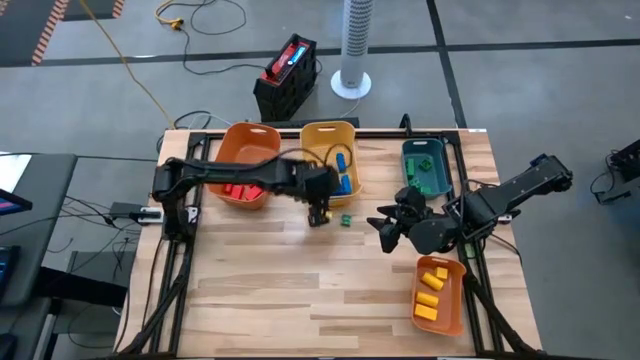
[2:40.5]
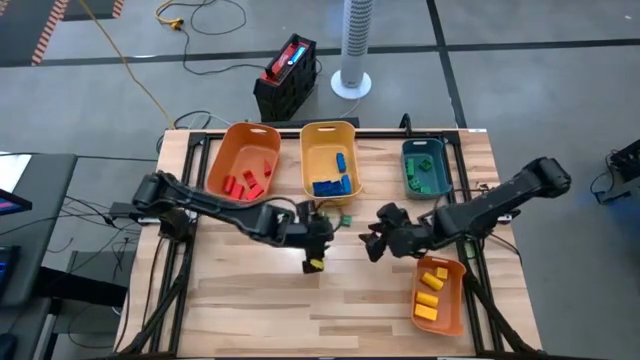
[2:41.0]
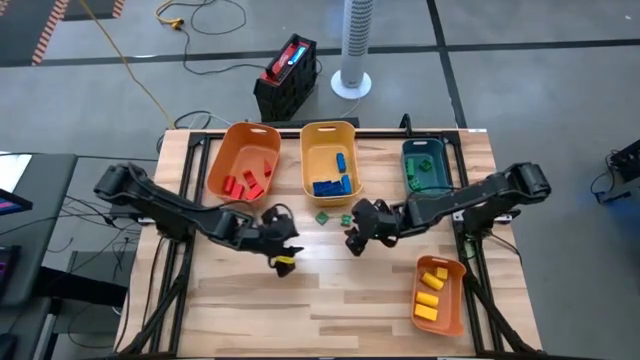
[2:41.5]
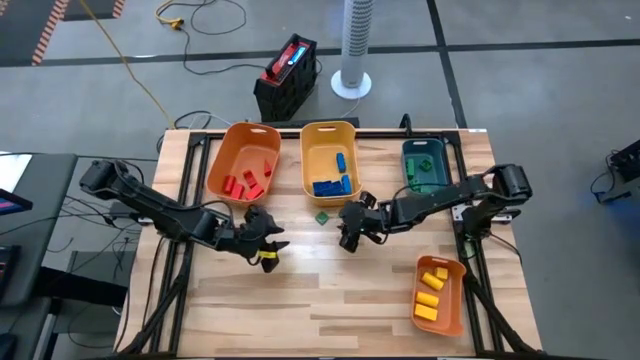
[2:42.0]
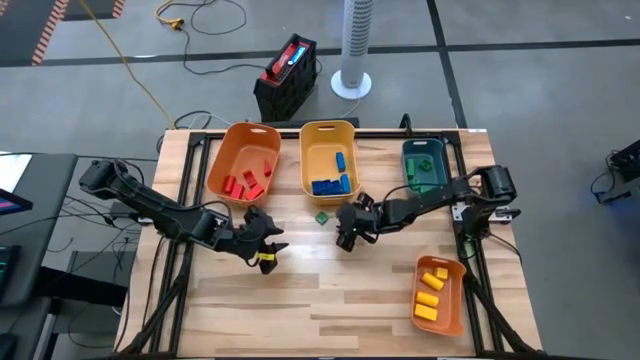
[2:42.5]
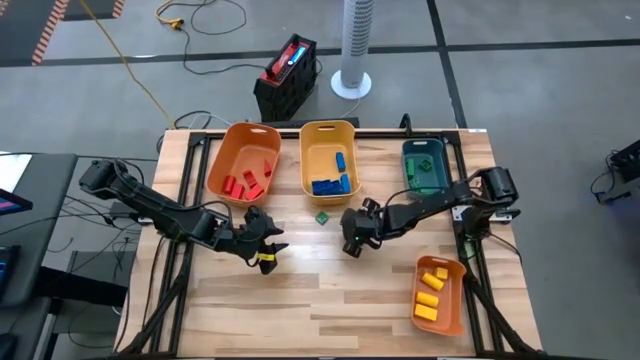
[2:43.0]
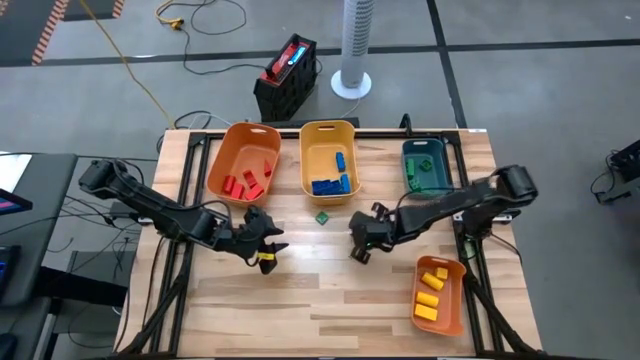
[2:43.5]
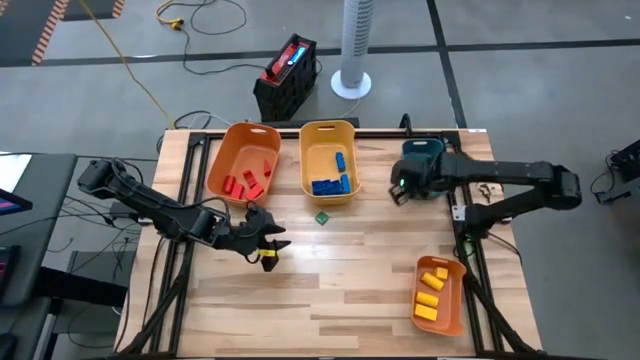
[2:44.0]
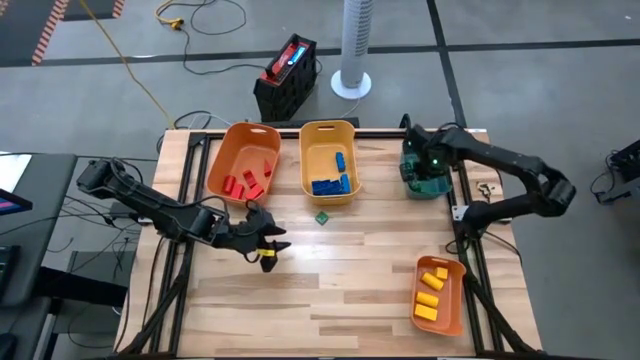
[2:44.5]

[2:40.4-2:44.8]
Task: Sort blocks
Put the green game piece into the blue bin

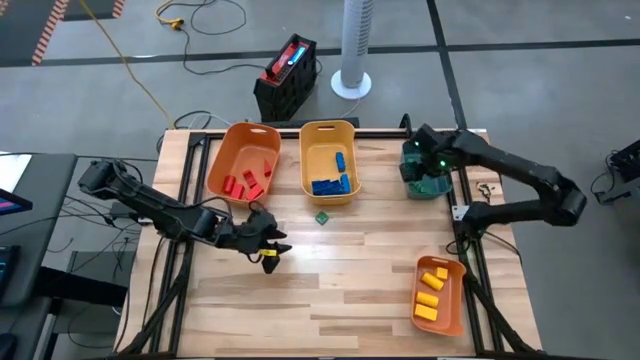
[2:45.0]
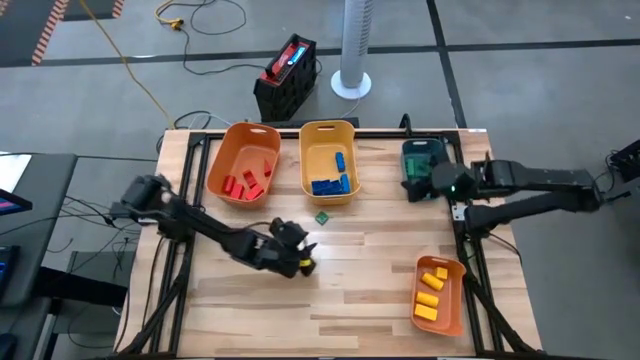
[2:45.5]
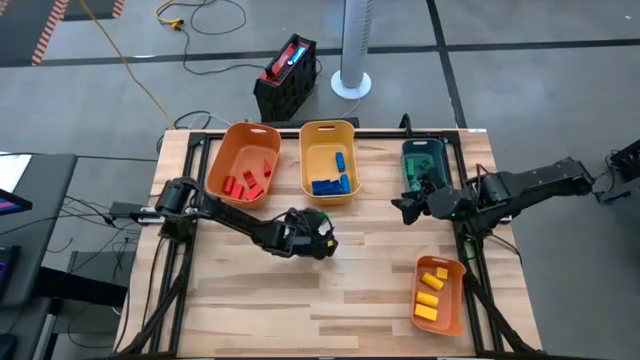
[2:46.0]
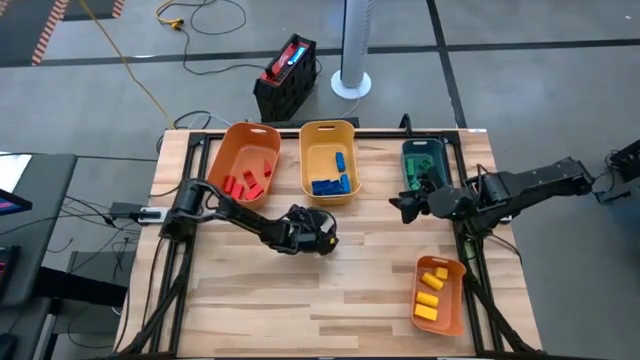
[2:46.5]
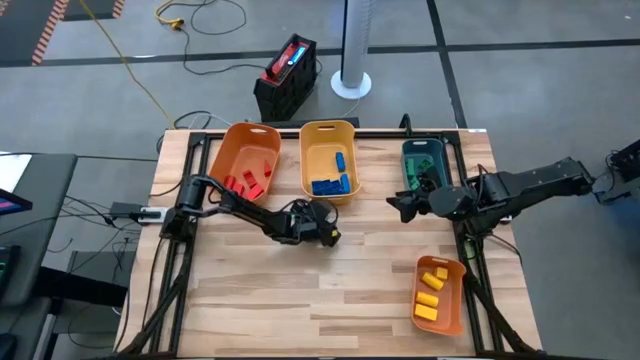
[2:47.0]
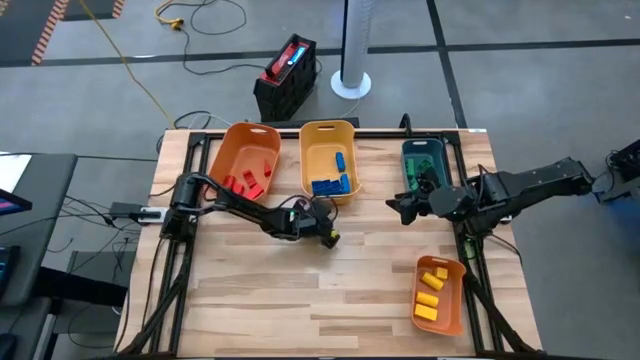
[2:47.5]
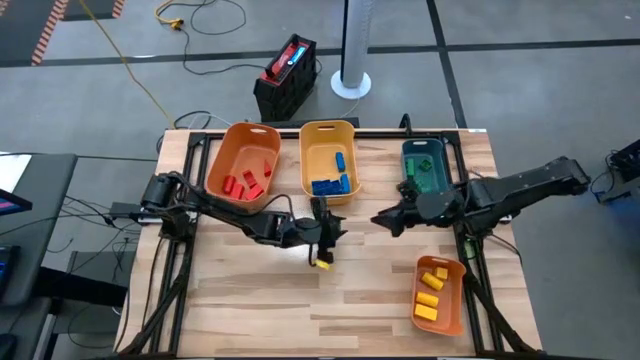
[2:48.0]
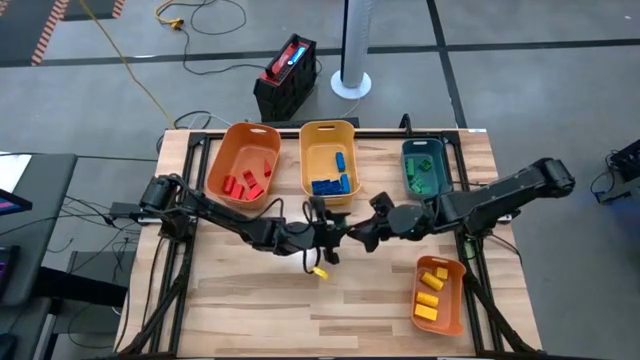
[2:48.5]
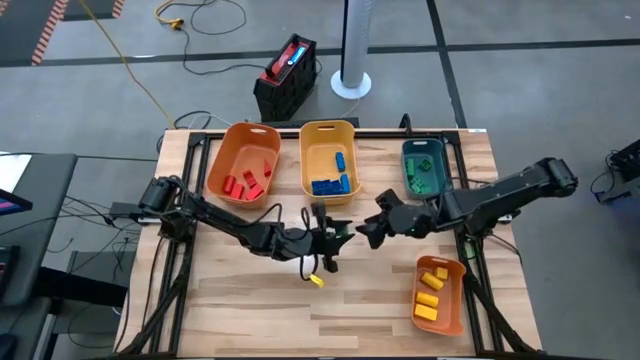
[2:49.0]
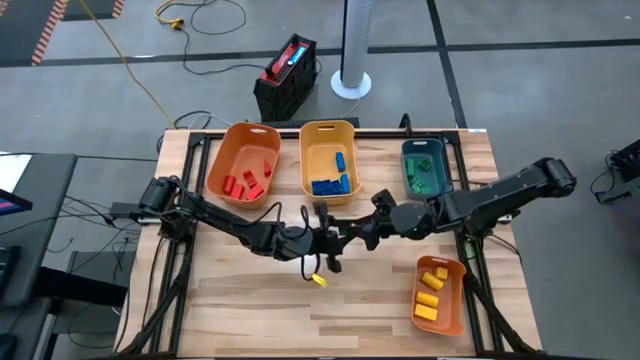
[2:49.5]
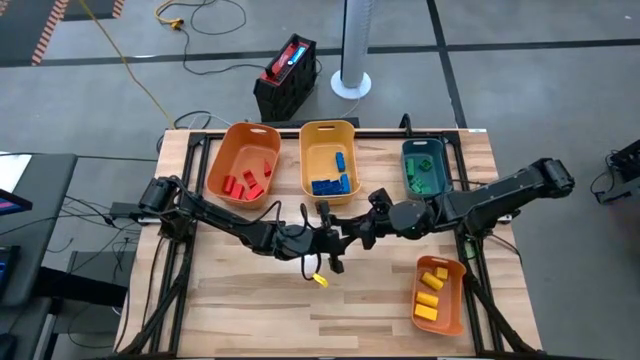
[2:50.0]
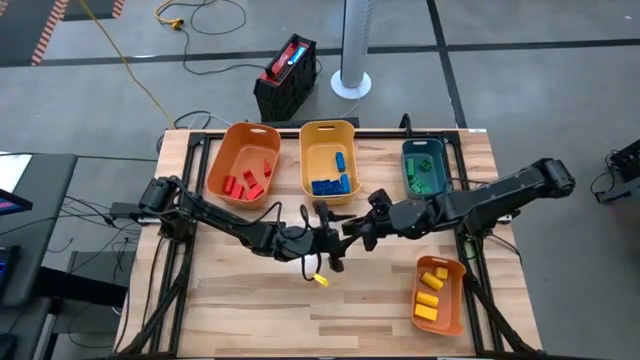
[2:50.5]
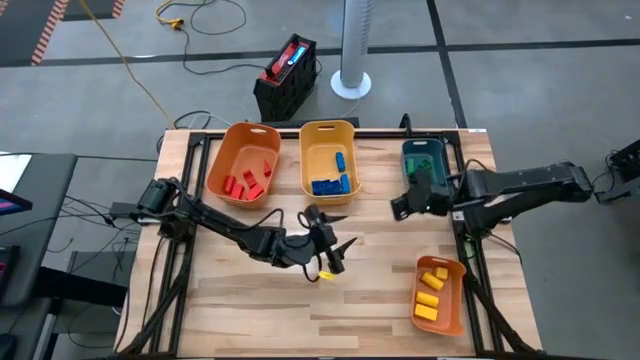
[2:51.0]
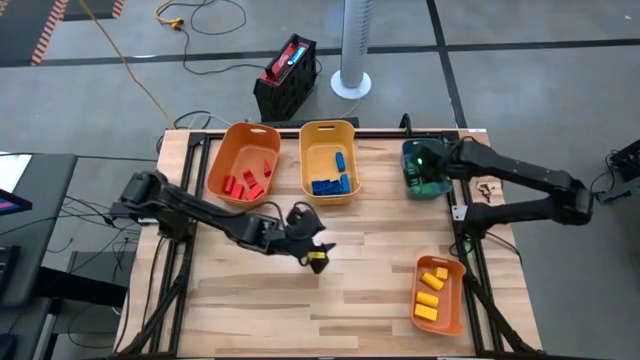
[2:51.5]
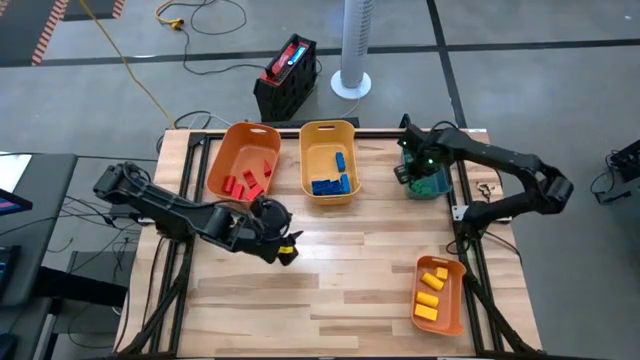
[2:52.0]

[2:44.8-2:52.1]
Put the green game piece into the blue bin

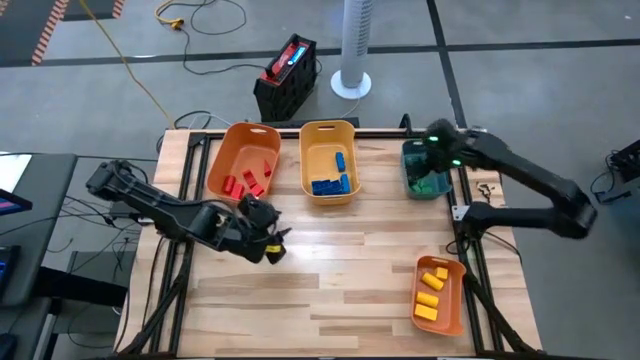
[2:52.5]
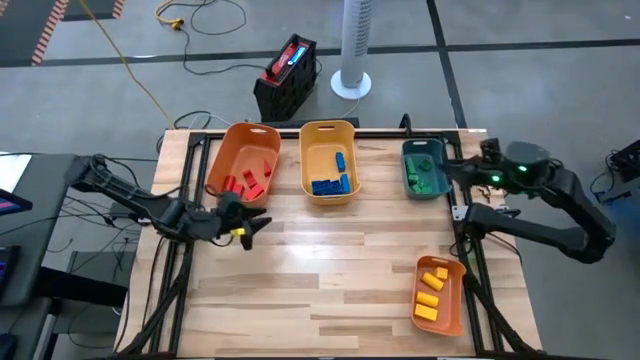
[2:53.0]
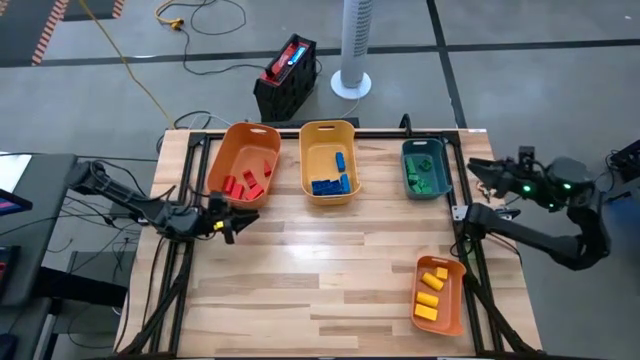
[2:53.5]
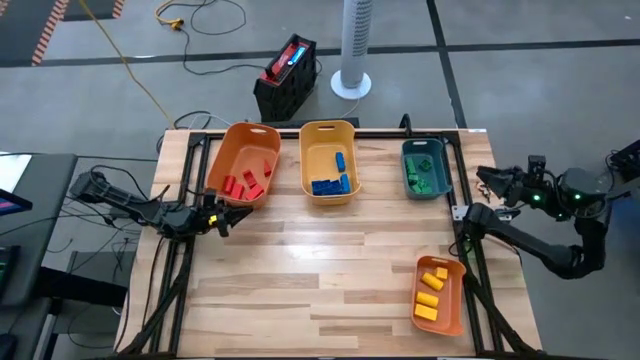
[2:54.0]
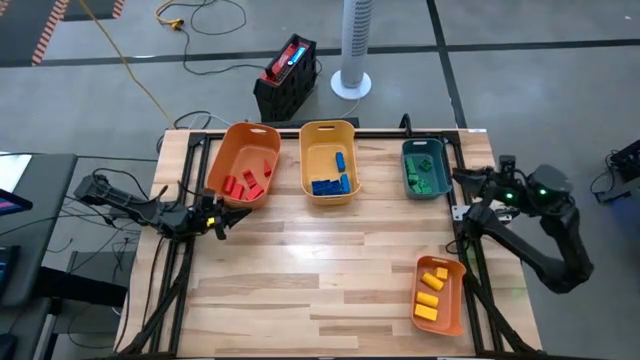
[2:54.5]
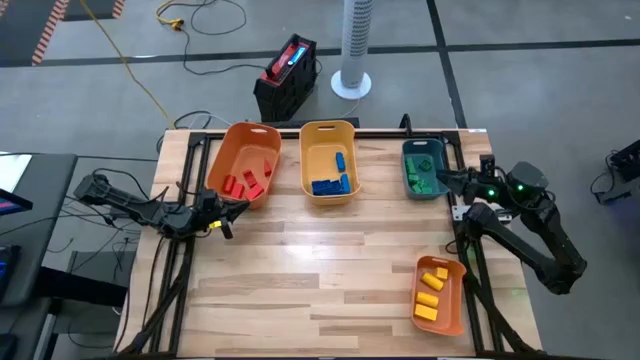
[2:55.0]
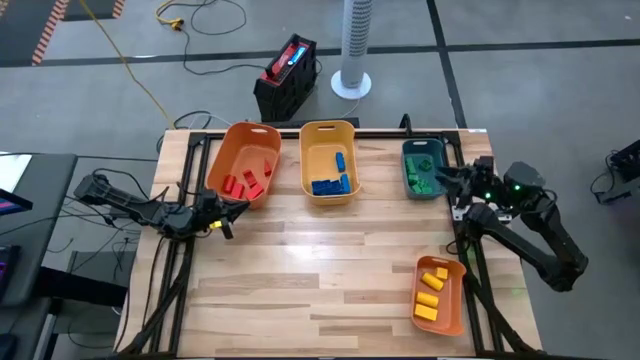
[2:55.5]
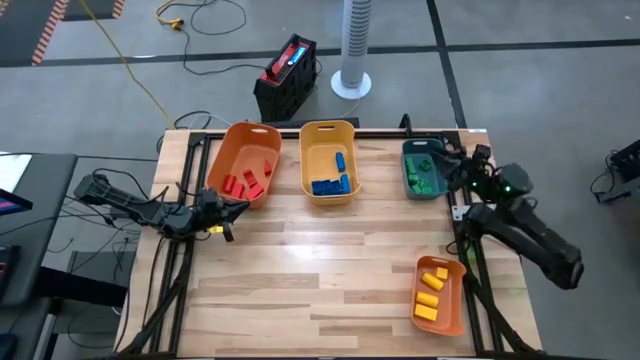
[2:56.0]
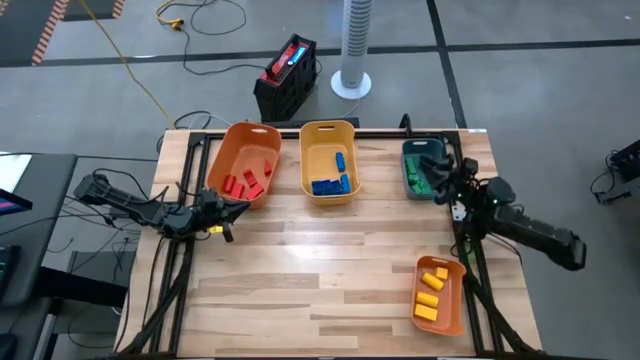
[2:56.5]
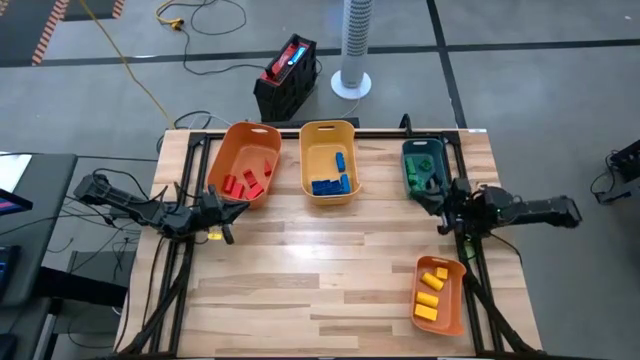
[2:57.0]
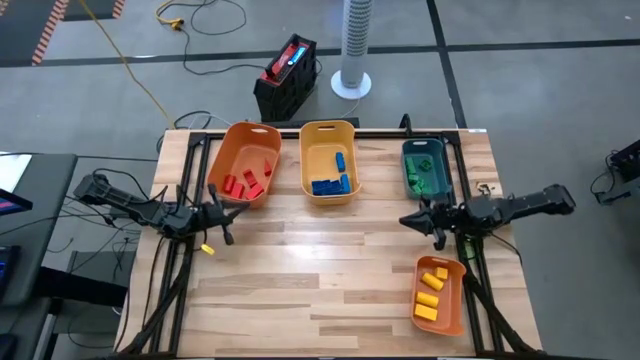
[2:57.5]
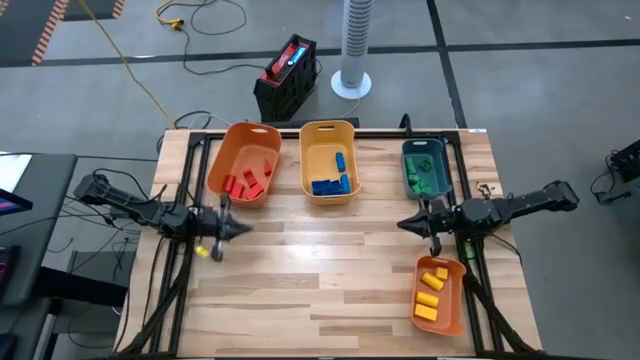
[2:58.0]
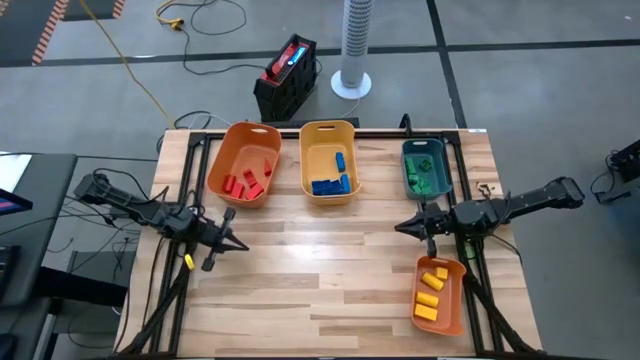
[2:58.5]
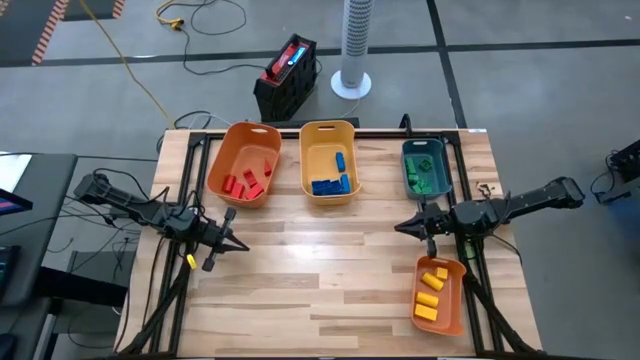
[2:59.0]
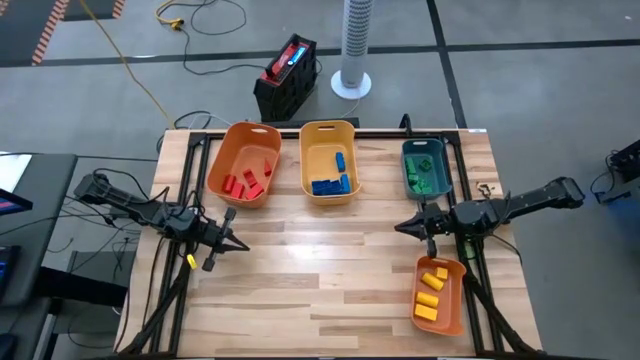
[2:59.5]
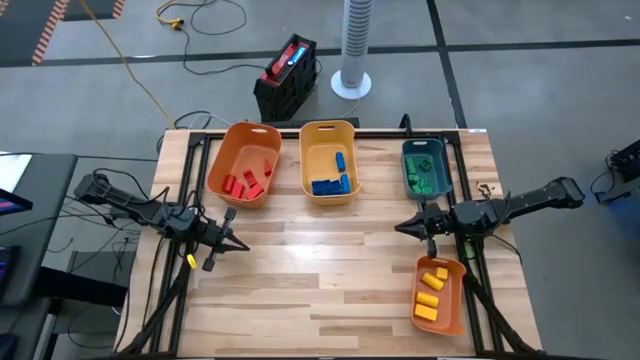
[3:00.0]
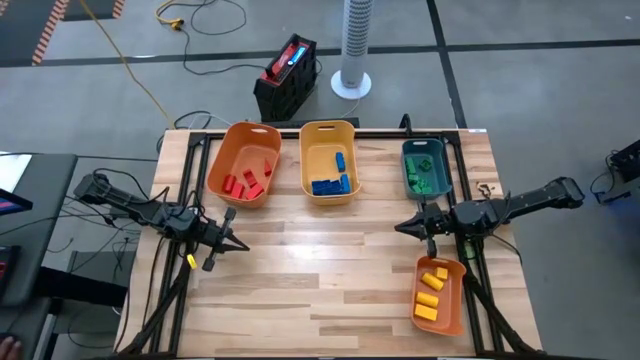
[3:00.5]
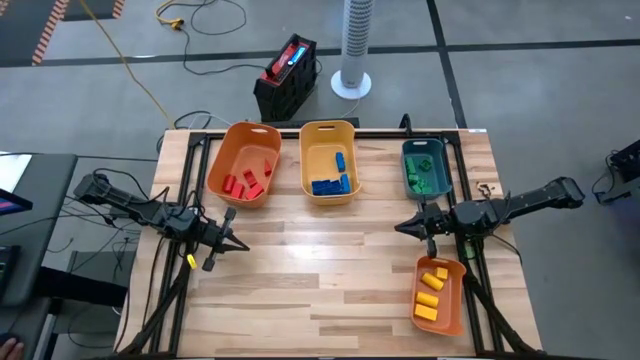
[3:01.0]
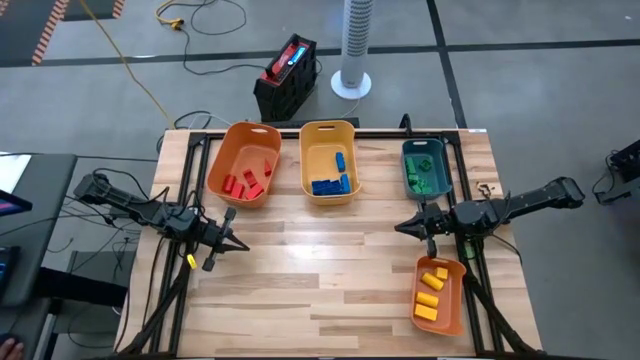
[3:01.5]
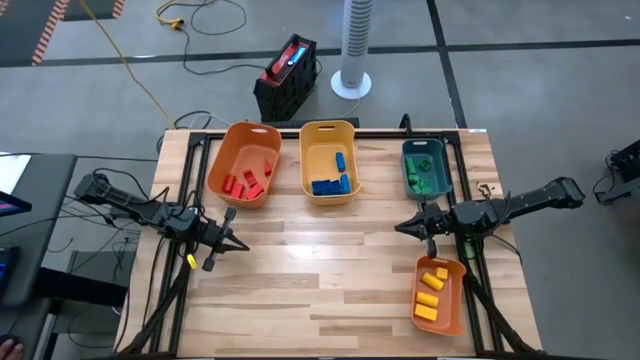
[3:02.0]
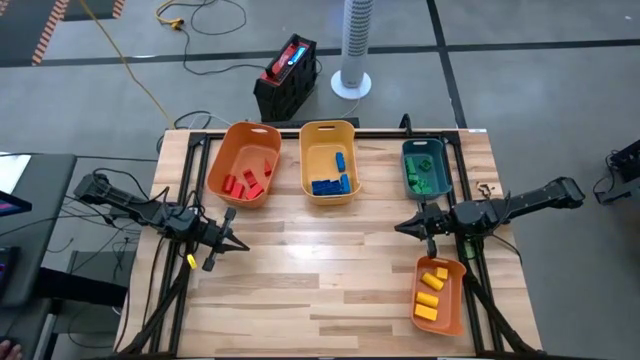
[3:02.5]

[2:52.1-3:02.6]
Return to Home Position
